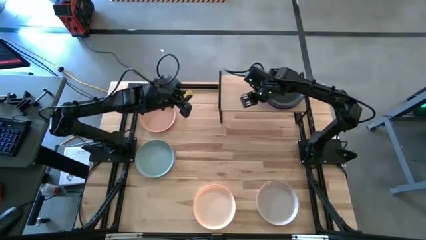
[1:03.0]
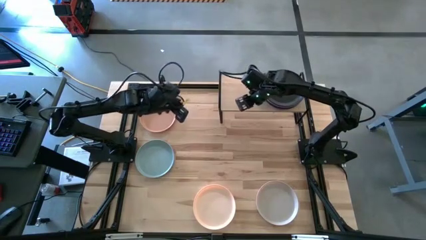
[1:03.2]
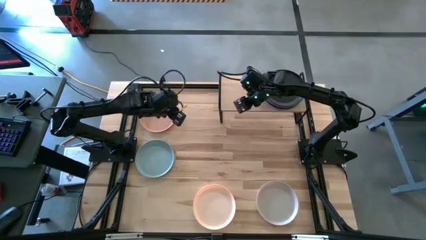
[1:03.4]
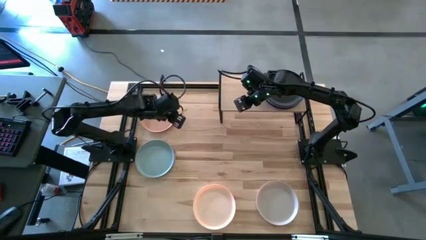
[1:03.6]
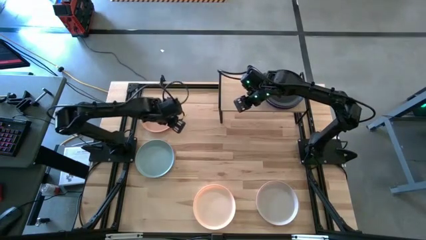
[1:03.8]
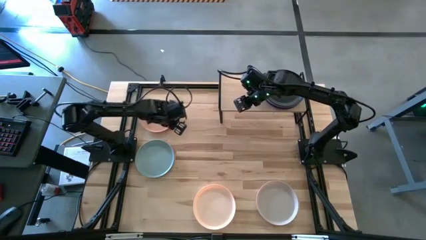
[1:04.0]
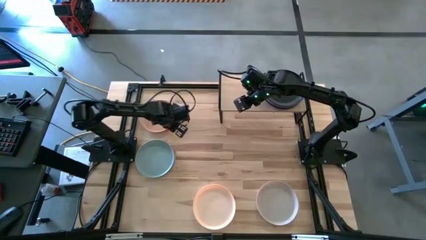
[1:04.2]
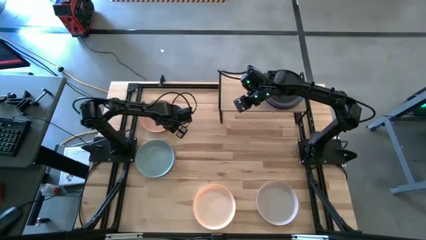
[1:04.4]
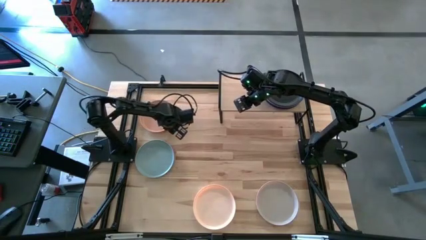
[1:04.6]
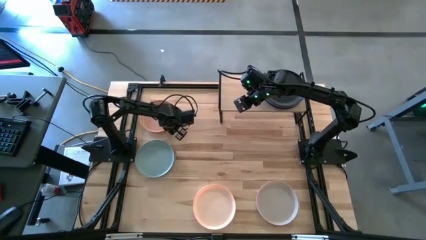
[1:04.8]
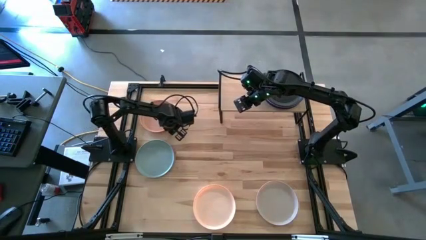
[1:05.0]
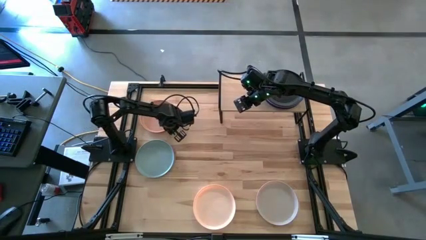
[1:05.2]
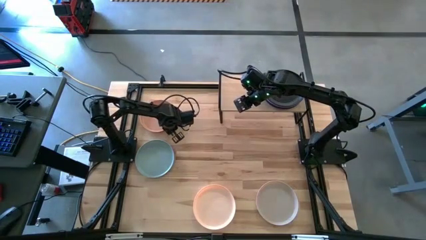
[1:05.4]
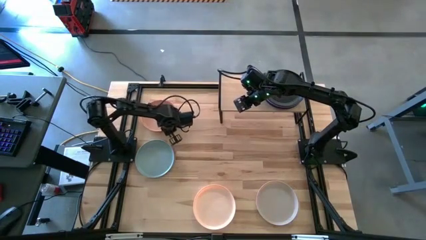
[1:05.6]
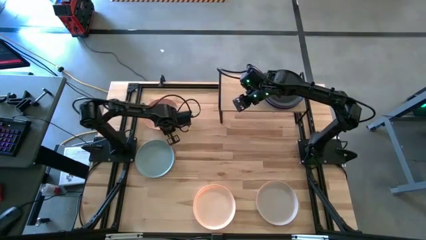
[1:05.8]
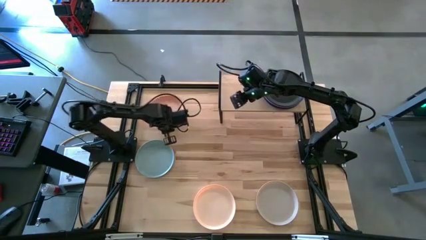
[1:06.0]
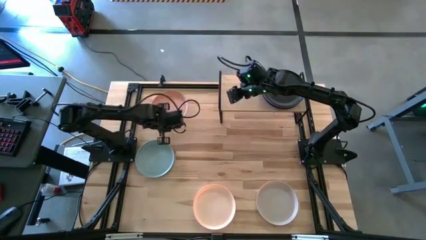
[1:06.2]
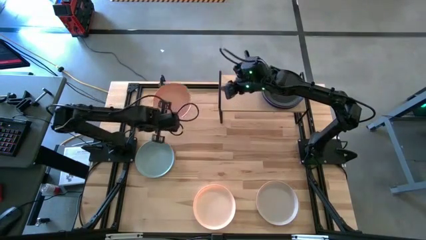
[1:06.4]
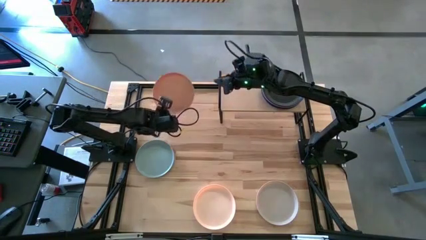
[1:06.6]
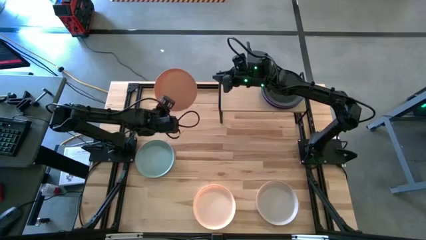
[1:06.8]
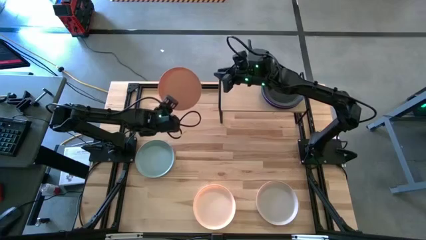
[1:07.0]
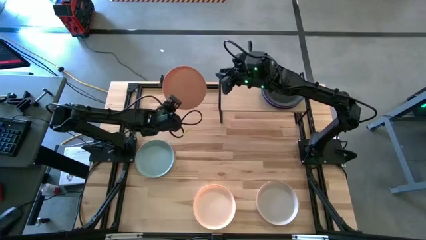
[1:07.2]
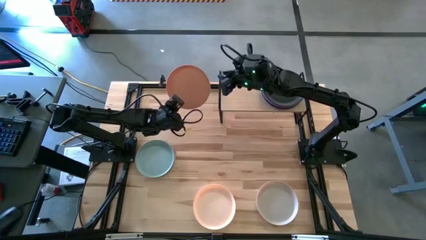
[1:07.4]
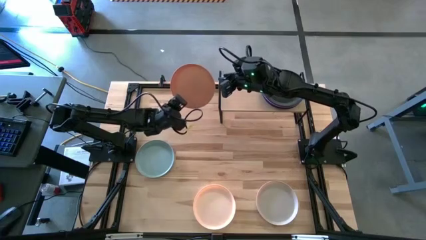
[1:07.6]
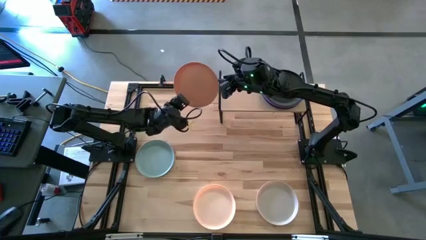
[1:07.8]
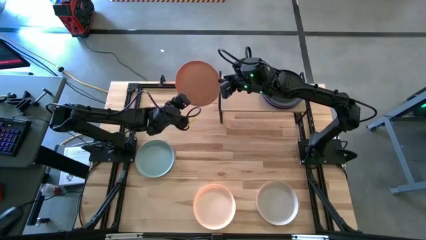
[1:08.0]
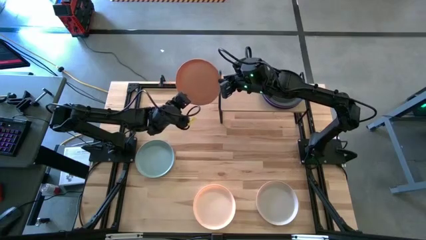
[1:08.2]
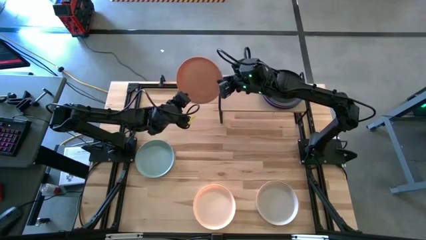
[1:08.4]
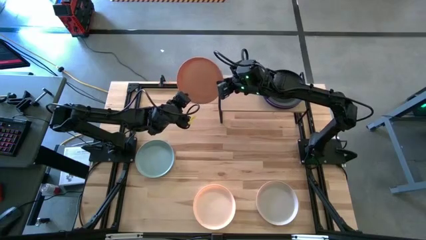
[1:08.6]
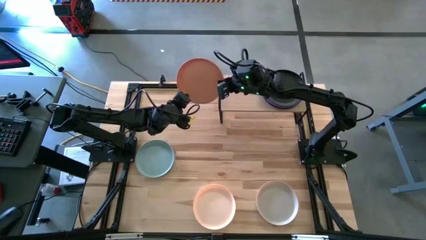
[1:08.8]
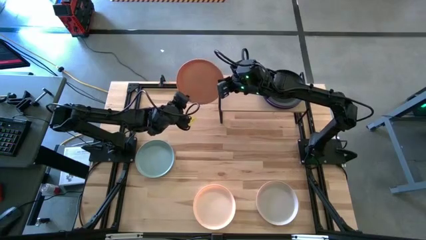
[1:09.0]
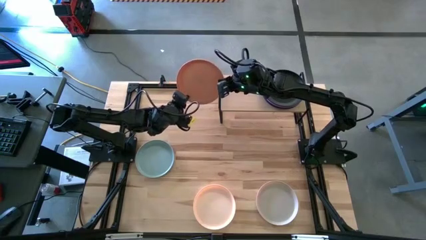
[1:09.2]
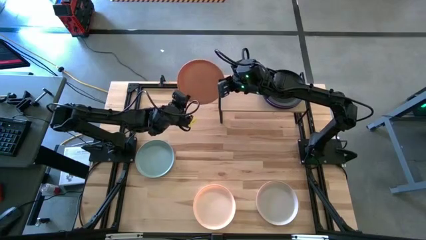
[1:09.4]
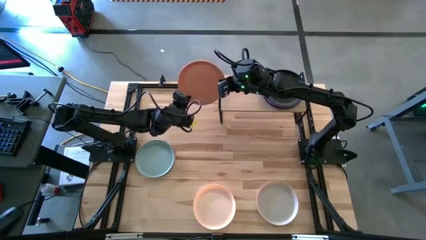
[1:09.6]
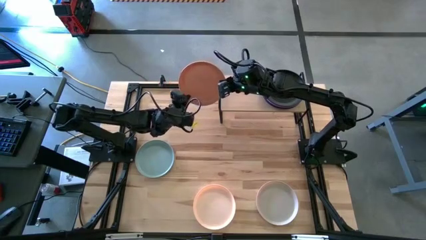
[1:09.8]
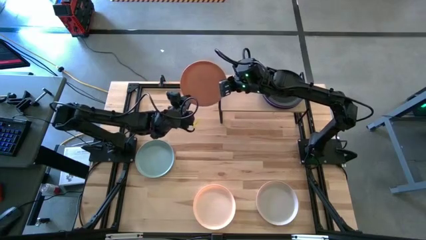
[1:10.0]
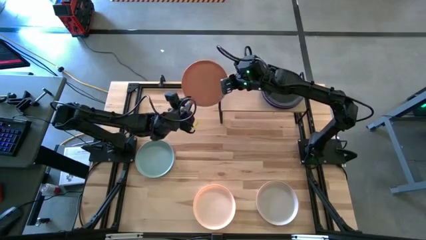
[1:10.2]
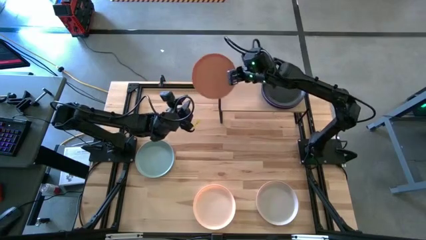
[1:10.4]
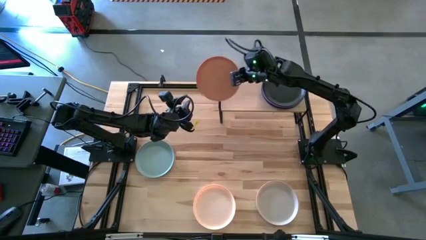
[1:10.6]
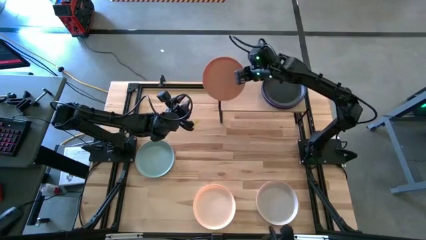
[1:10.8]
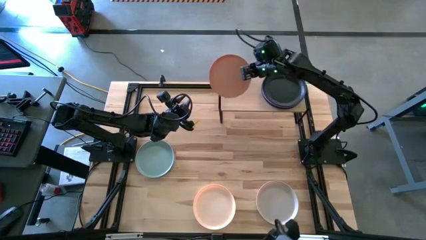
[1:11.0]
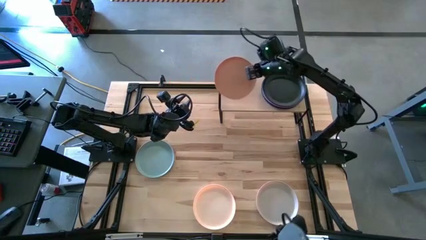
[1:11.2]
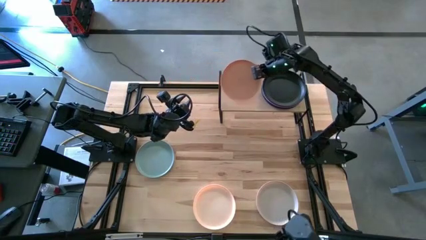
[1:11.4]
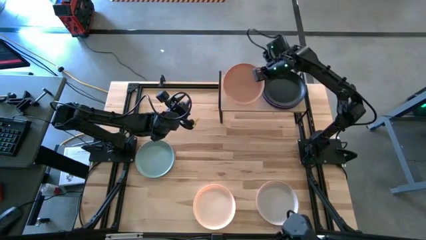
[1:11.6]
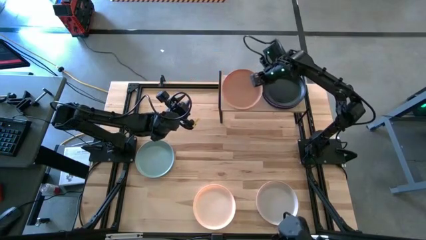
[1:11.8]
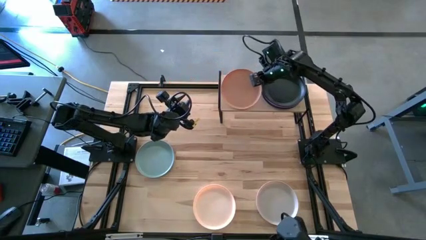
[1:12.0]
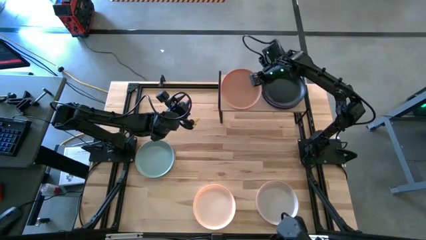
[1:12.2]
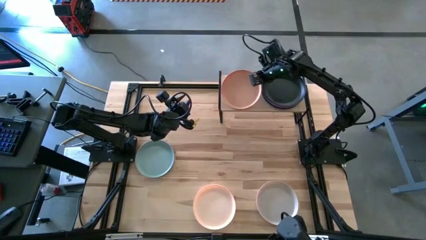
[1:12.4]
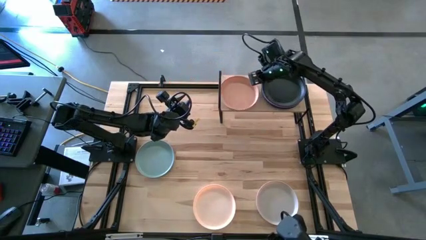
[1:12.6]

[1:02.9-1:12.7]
Task: Place and stack plates onto a shelf
Put the orange plate on the shelf

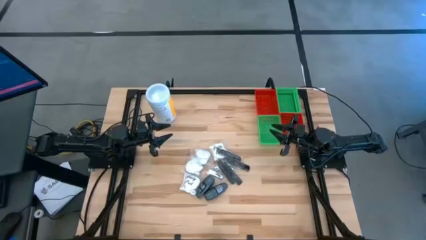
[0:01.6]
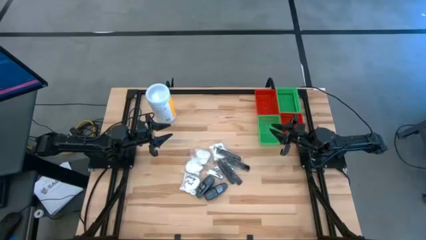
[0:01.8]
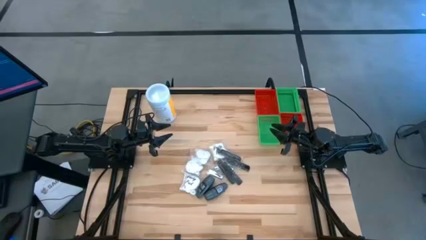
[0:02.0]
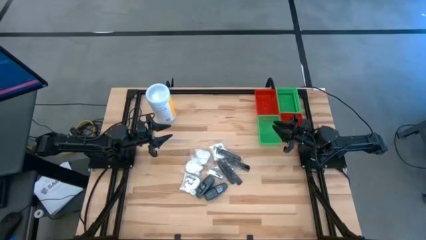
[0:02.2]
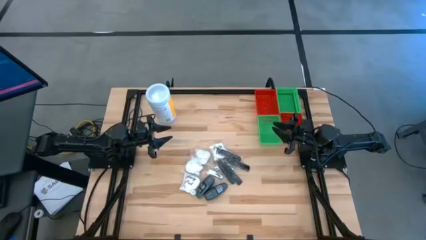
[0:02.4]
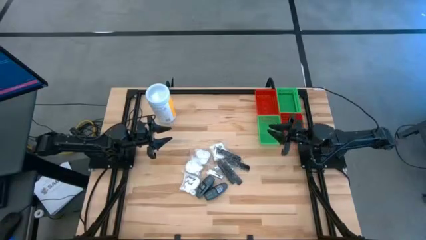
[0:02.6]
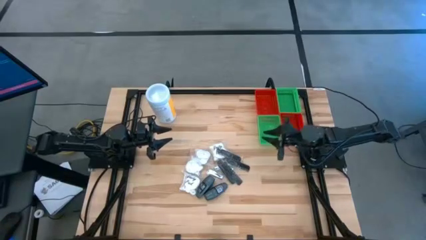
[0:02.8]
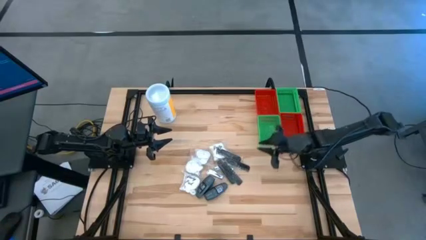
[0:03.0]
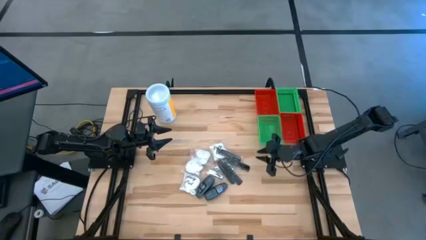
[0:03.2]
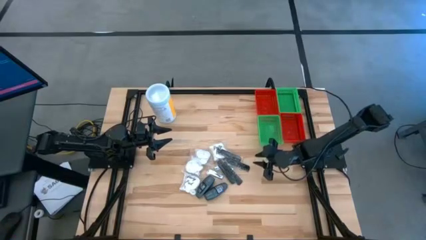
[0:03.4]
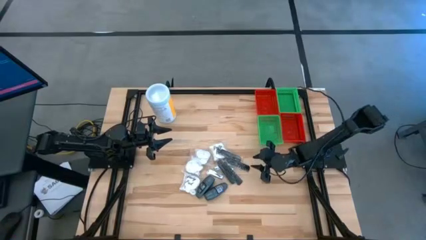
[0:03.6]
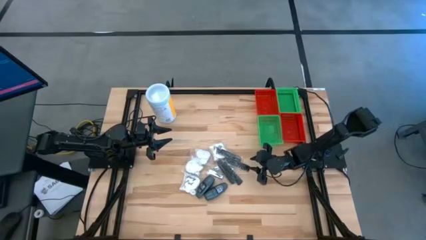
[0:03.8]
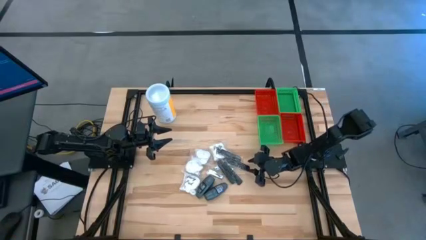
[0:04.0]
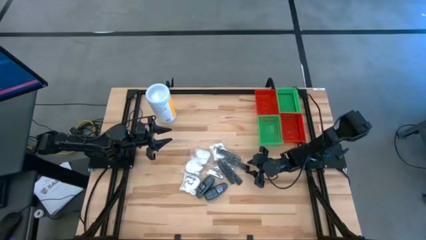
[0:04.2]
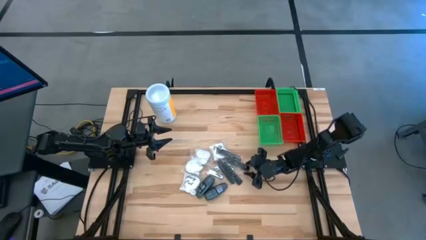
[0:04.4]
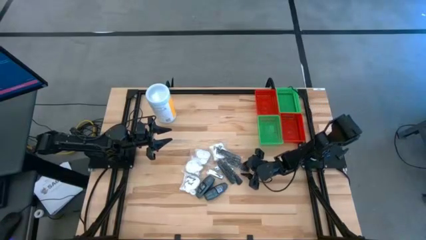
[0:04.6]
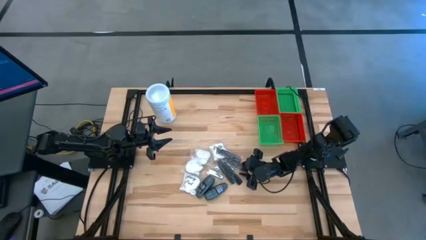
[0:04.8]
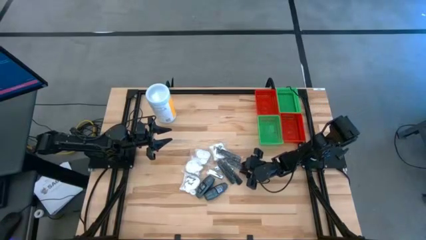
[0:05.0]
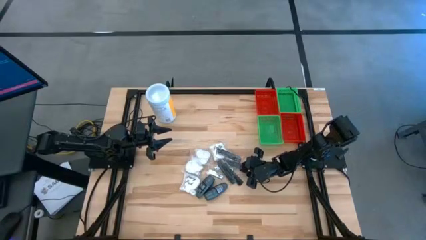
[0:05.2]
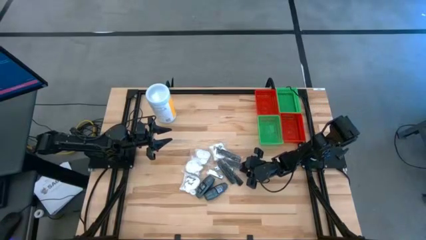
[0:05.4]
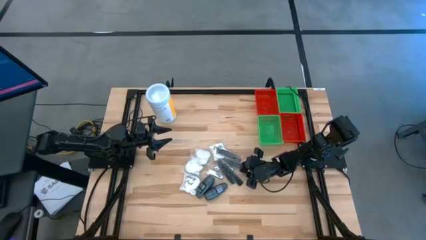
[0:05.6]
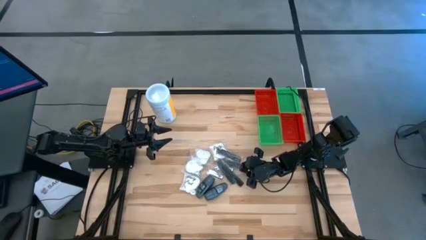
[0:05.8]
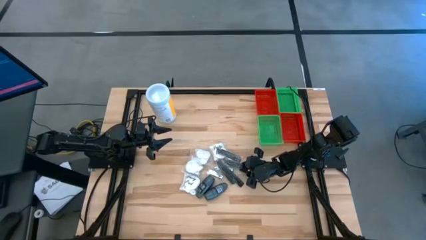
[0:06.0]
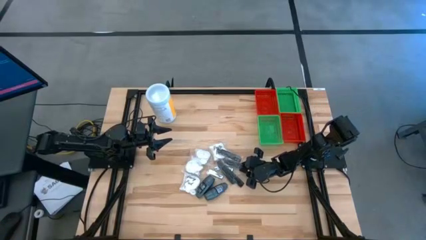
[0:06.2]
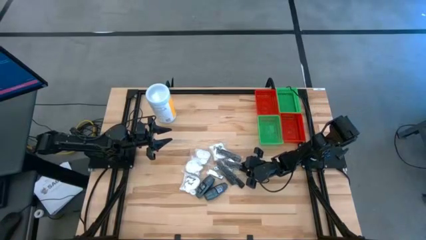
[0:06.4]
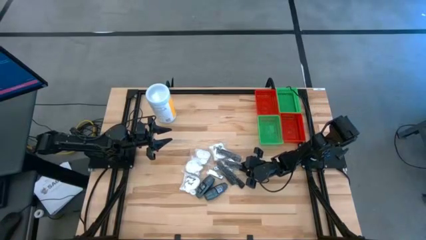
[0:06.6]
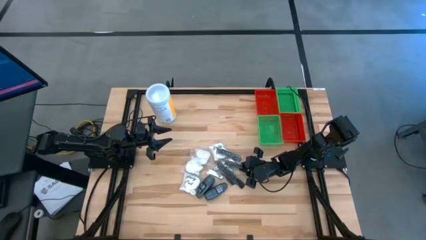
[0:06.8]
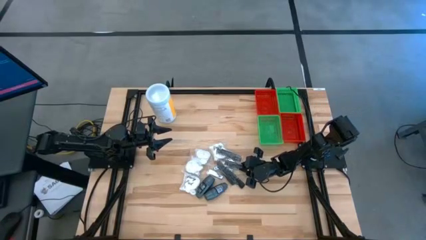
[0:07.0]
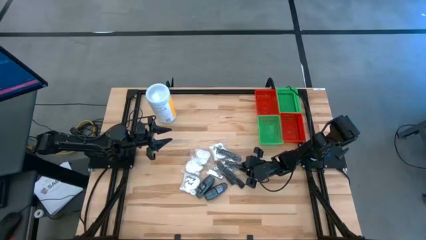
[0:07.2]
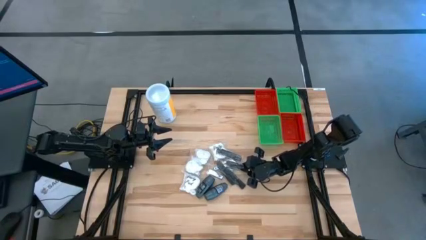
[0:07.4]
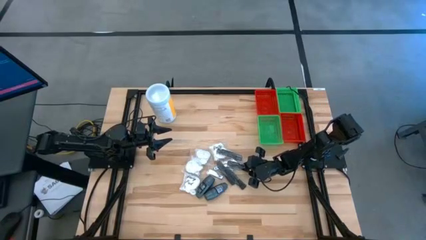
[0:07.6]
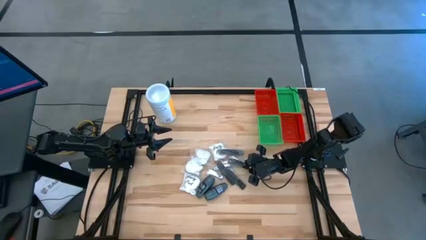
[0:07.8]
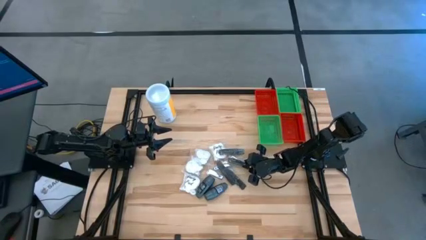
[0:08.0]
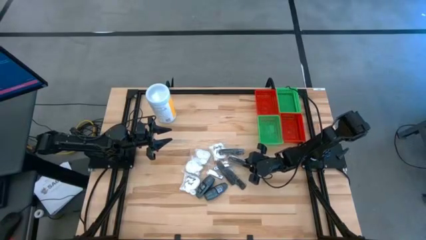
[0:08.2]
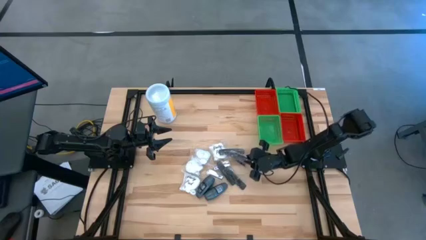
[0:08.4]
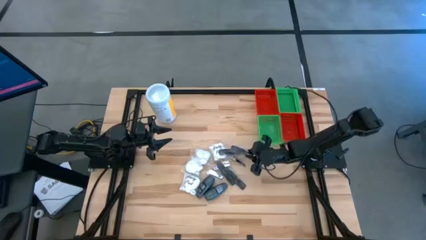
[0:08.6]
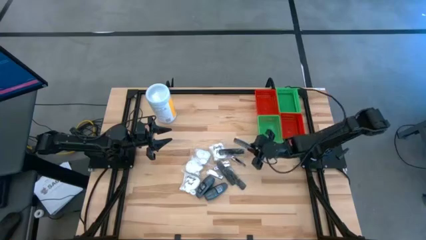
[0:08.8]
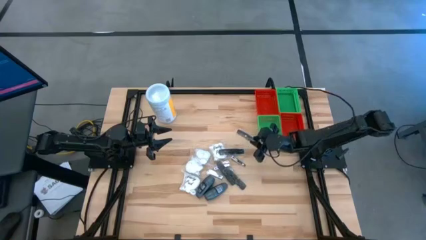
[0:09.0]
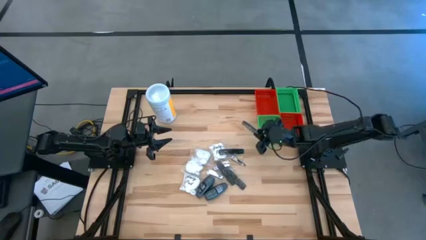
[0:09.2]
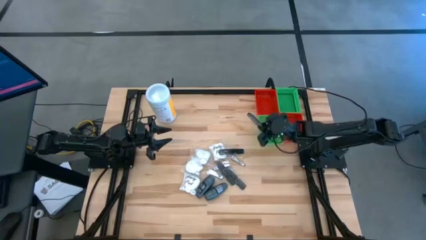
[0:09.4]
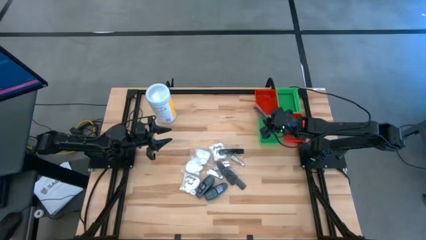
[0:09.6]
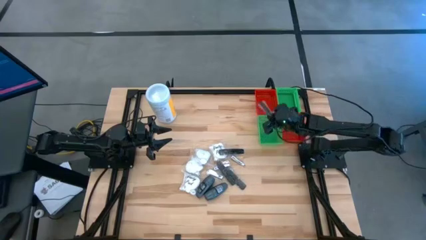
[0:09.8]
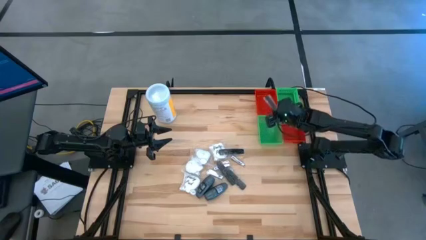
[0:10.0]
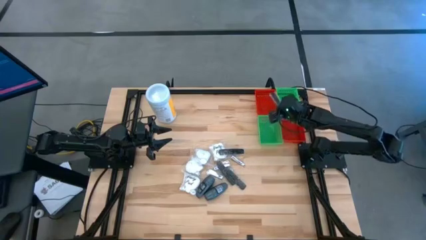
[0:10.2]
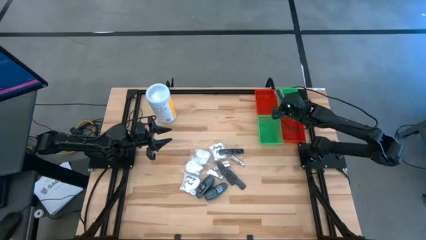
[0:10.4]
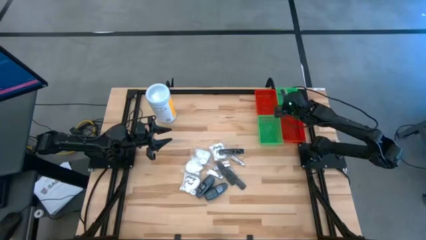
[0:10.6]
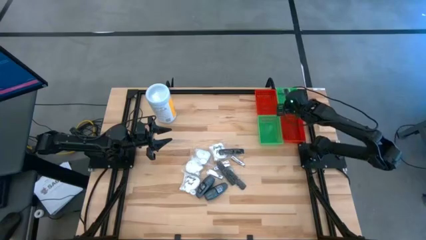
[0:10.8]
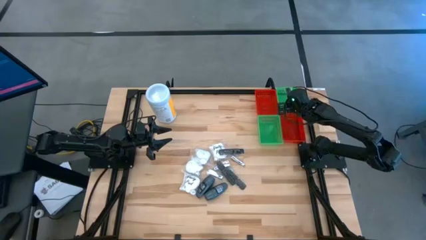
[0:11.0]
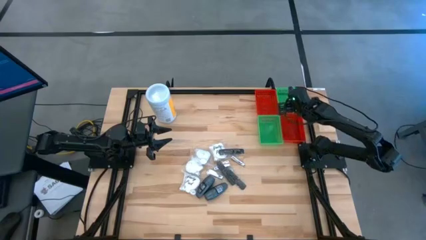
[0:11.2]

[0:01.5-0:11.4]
Task: Pick & Place Travel size toiletries
Put the black comb into the top green bin
